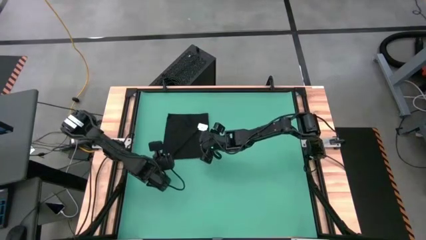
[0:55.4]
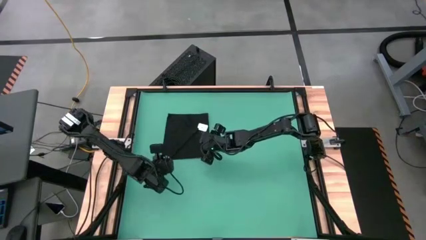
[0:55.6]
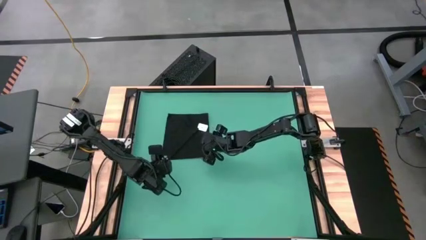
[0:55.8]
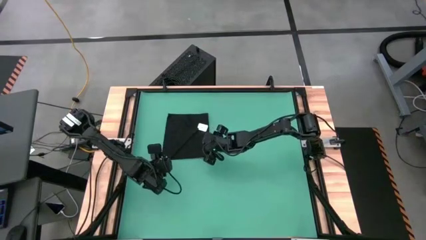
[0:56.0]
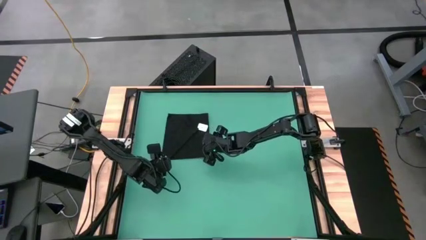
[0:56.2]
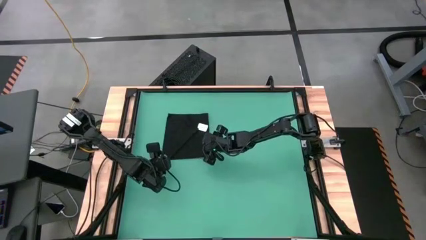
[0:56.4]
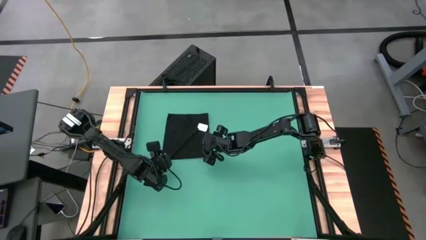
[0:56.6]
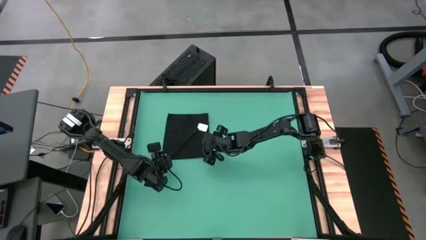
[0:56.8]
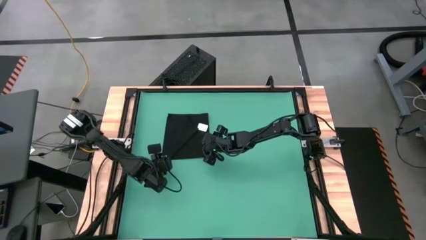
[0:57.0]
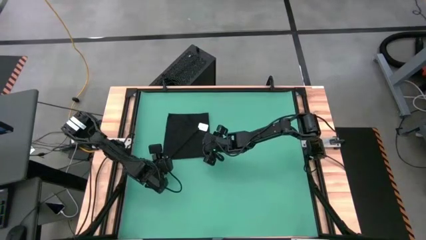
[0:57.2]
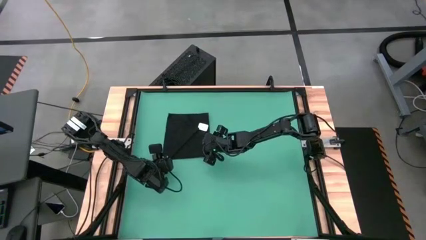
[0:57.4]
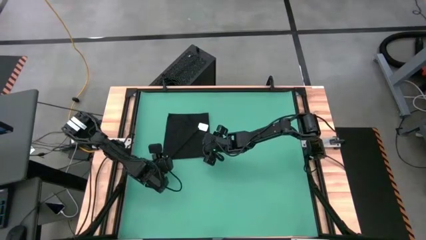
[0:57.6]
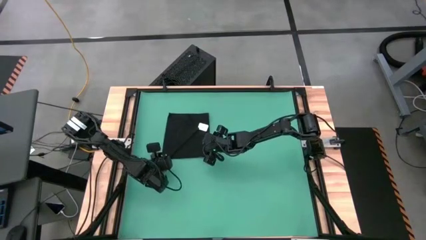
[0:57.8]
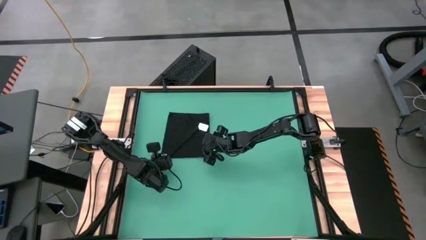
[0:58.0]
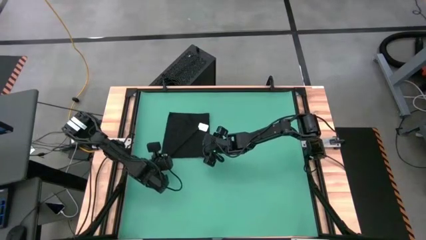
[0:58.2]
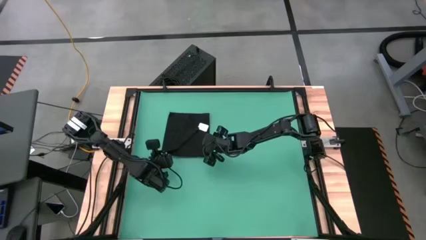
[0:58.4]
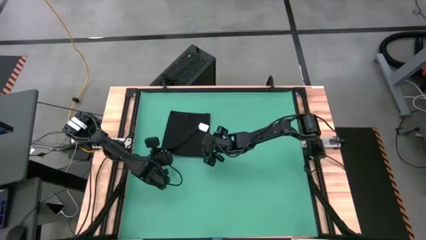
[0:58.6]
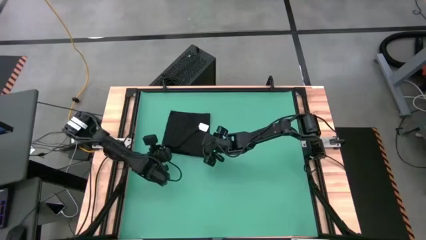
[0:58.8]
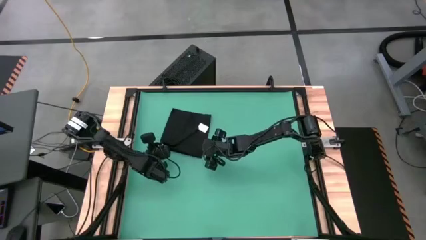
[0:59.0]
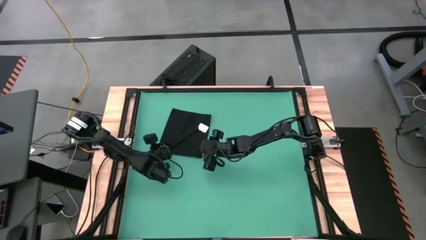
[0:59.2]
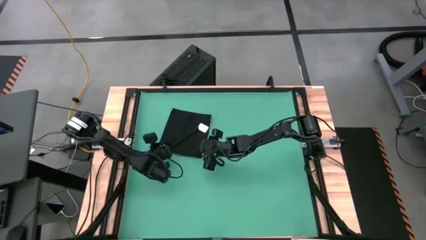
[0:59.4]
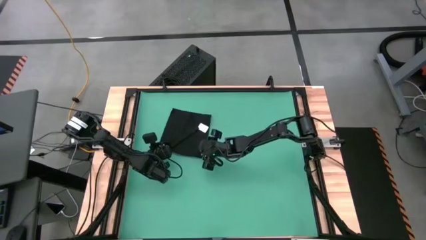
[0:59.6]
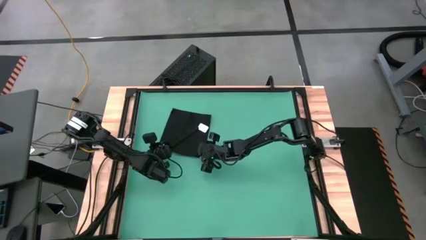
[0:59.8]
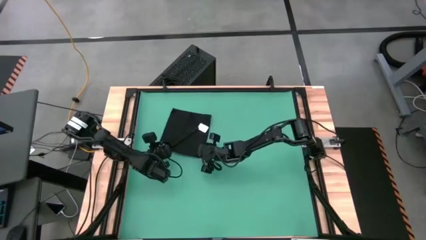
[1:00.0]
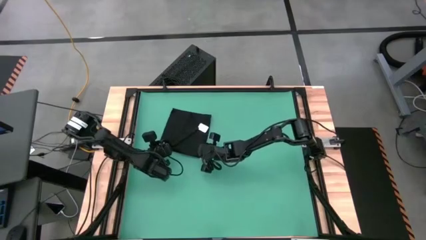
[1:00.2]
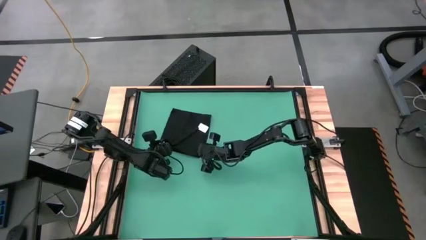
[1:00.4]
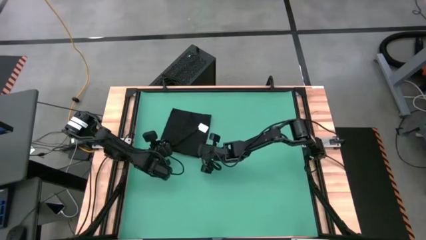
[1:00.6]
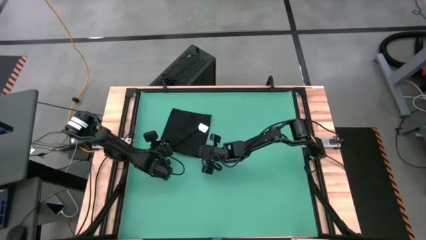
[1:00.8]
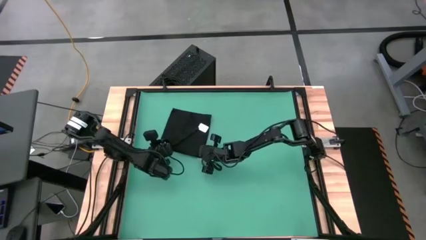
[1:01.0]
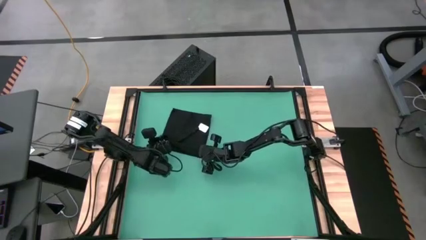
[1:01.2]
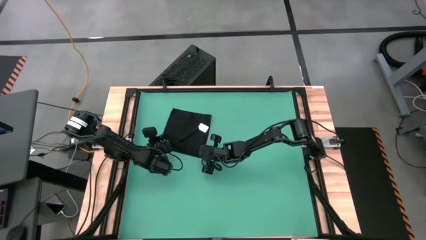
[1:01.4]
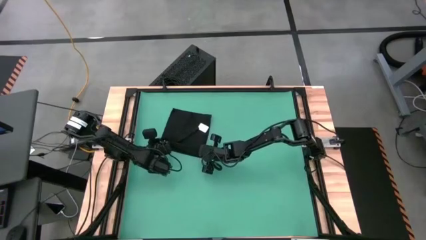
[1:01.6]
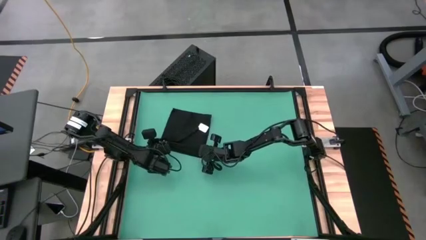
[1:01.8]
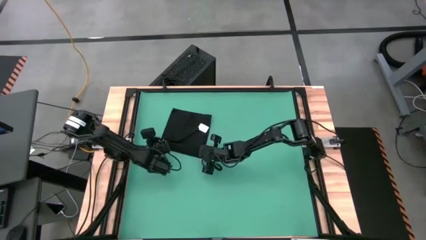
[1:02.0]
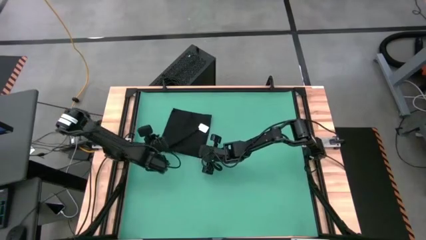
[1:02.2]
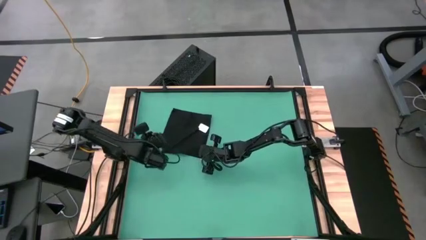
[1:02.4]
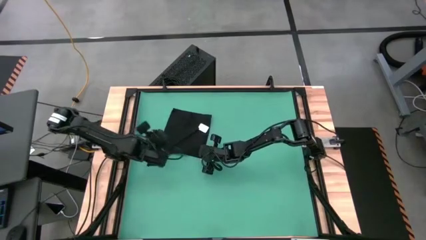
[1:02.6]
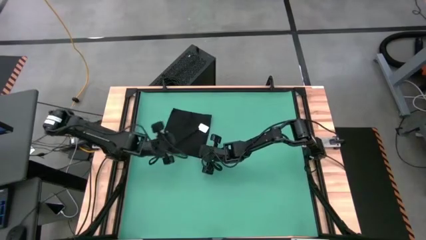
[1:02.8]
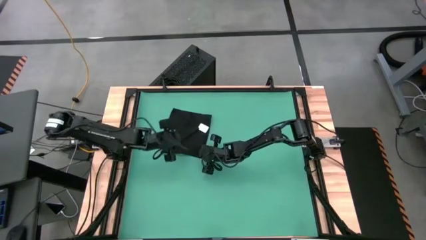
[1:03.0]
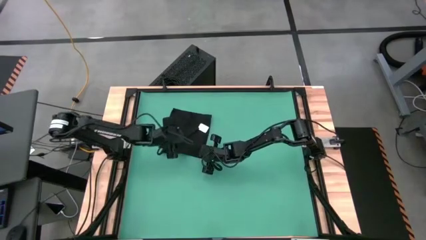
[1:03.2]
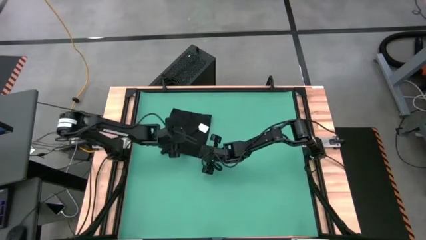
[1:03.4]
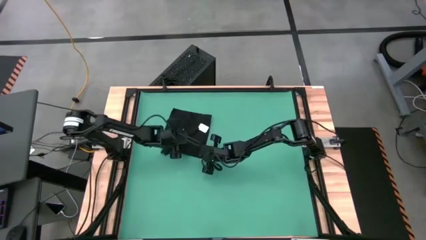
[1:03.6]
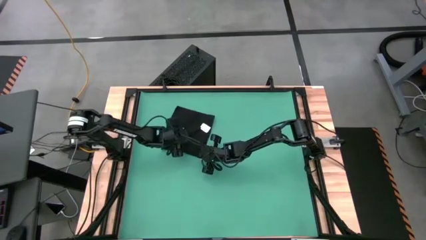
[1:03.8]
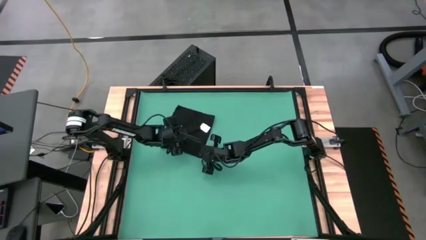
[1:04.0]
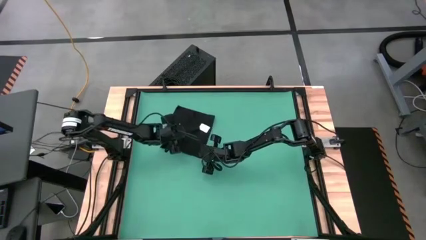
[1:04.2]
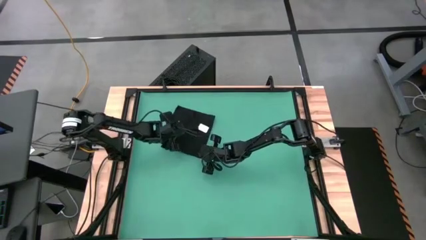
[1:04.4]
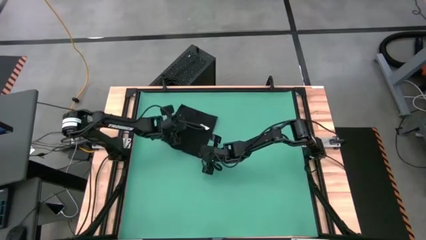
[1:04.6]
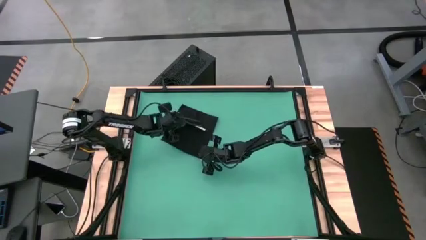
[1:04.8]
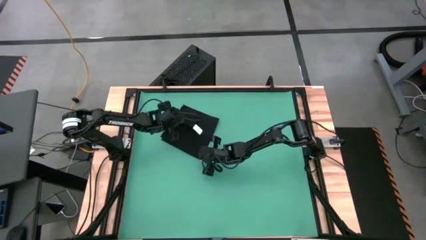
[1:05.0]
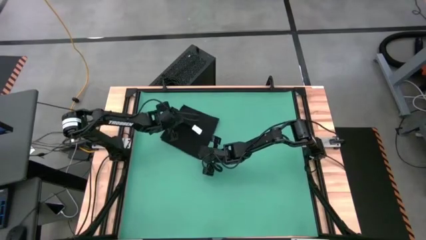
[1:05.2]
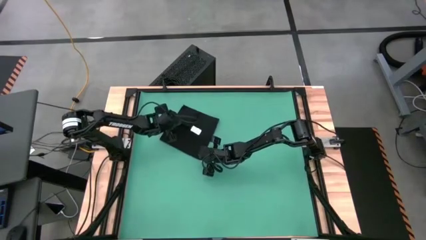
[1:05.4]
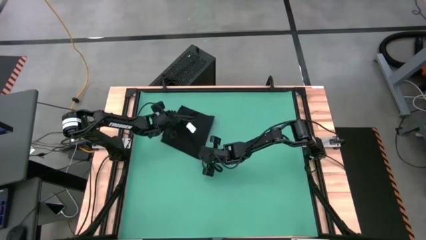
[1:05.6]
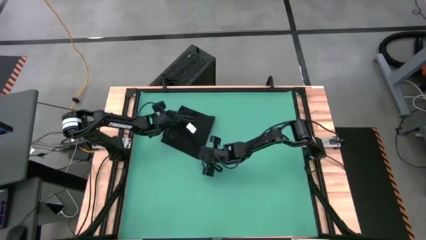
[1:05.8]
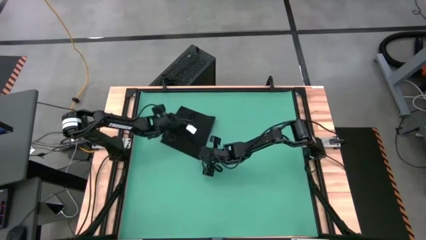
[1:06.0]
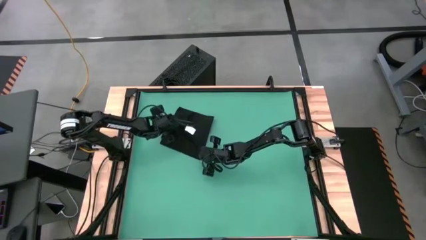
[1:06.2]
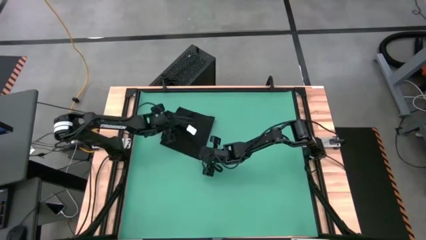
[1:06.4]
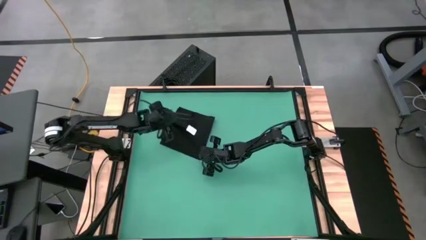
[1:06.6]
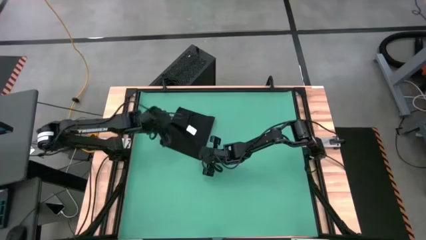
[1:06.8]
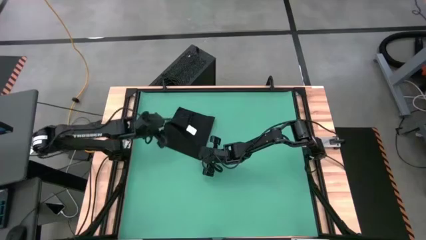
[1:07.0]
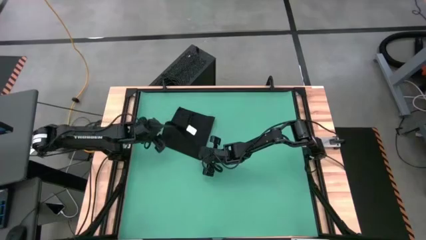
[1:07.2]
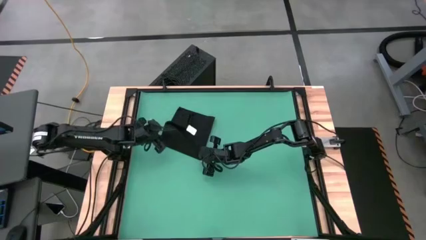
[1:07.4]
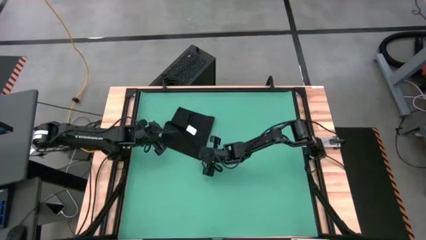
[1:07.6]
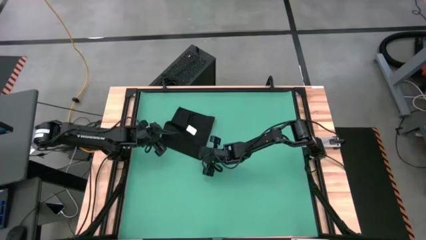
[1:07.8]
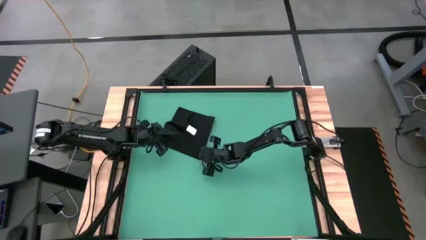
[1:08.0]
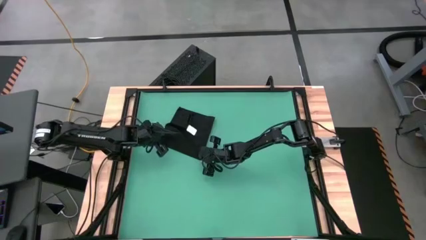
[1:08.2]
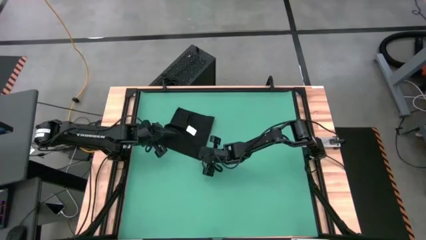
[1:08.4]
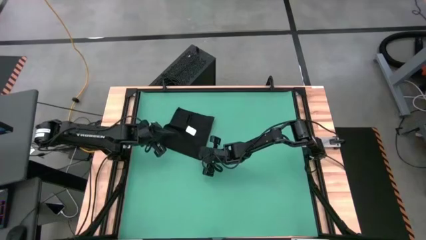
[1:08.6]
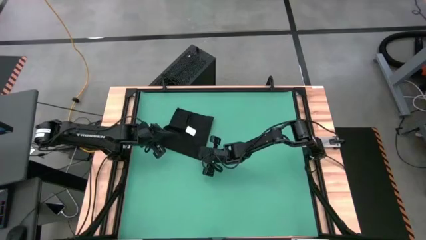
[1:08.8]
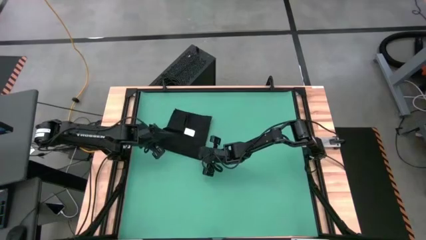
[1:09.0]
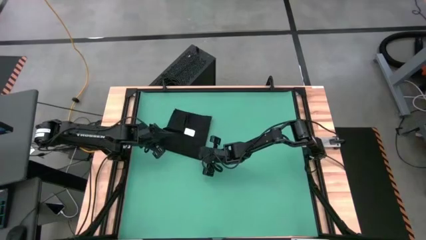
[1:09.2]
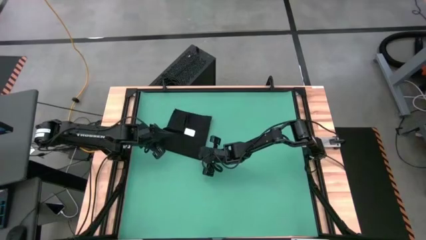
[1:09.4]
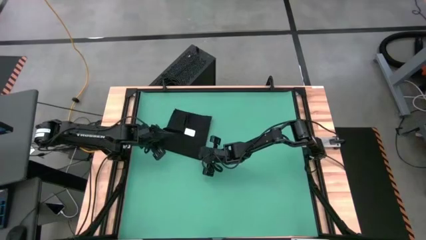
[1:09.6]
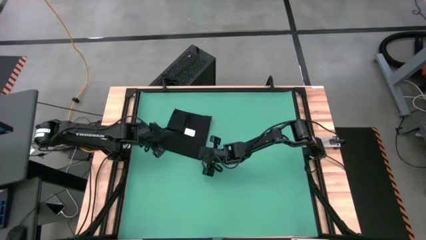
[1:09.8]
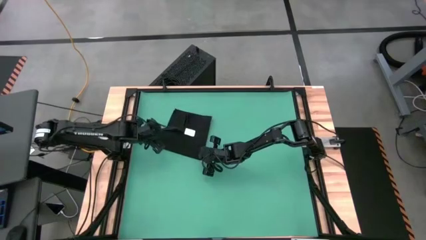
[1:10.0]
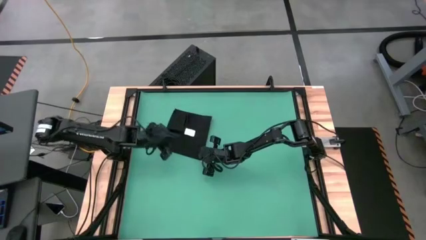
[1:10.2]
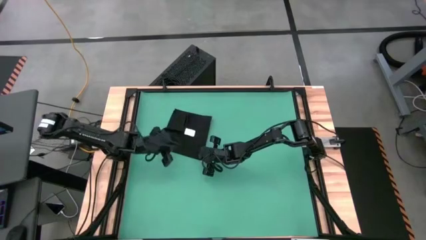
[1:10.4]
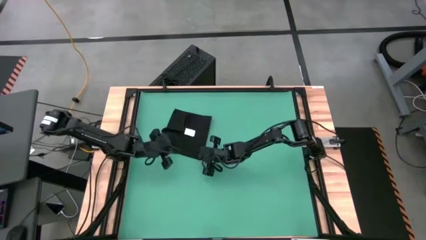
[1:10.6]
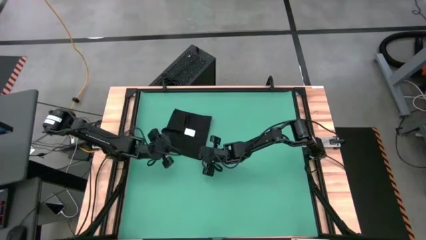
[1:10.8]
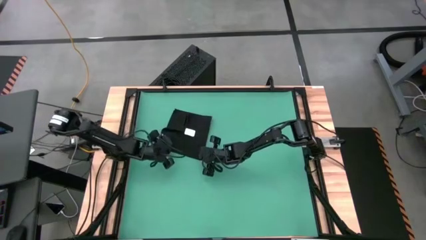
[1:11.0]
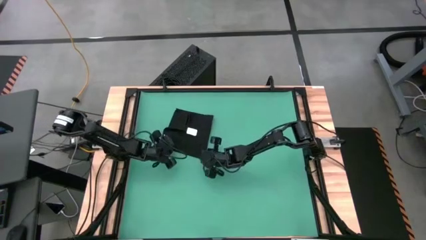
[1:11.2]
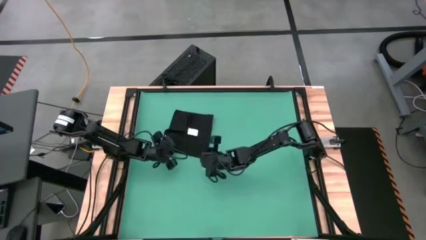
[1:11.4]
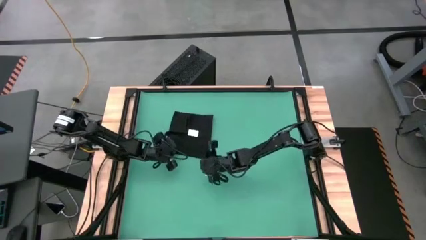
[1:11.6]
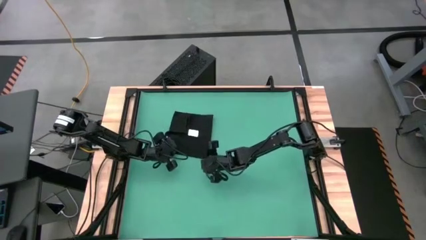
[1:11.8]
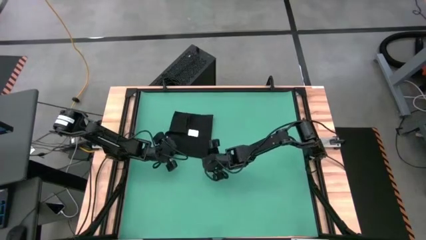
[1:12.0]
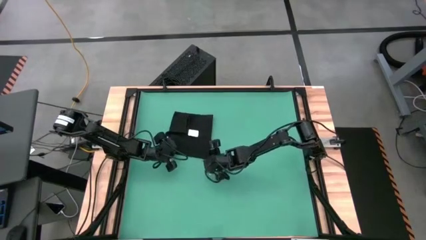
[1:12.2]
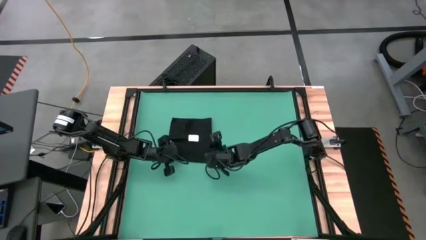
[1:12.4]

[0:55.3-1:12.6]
Task: Roll towel
Roll the black towel
